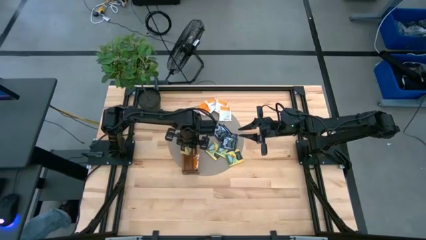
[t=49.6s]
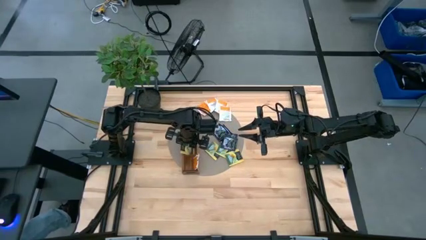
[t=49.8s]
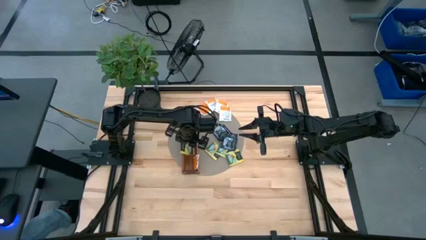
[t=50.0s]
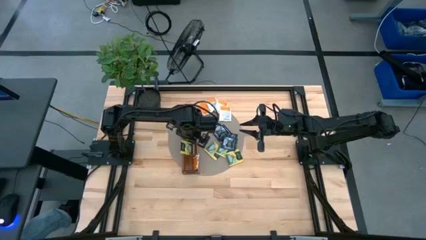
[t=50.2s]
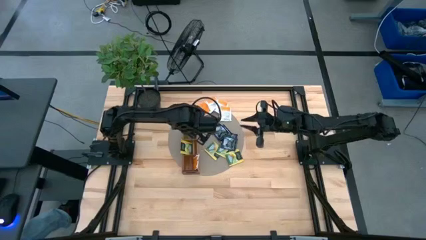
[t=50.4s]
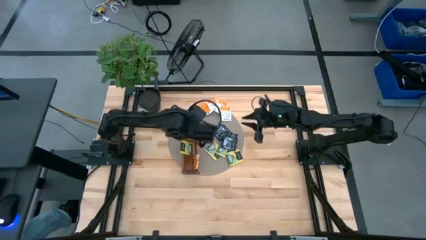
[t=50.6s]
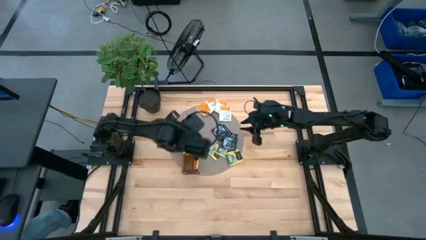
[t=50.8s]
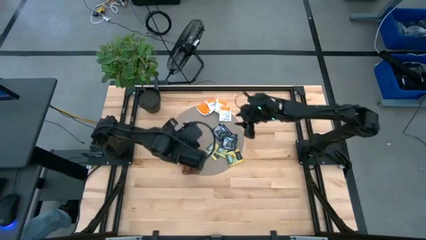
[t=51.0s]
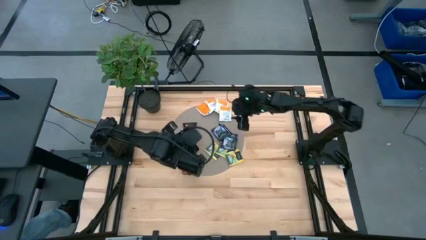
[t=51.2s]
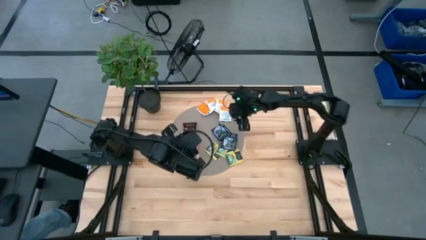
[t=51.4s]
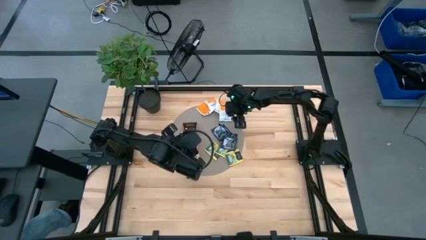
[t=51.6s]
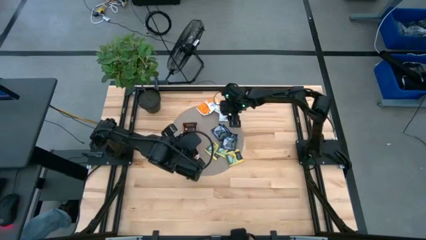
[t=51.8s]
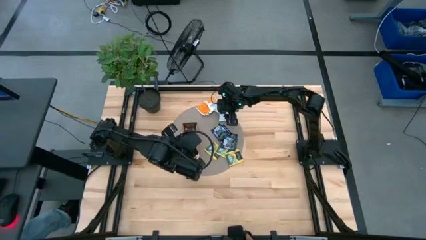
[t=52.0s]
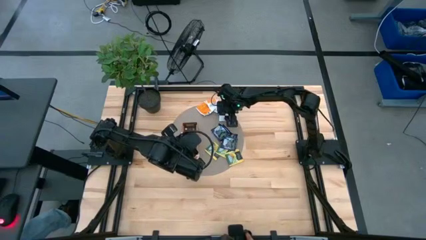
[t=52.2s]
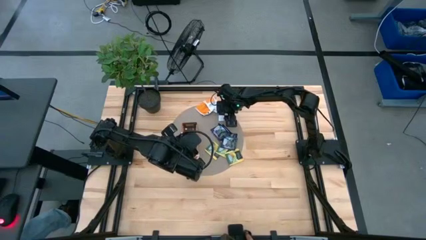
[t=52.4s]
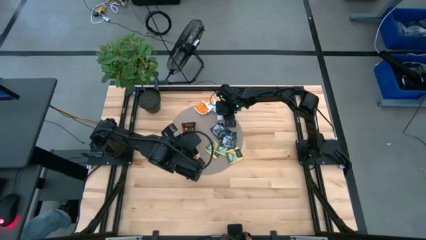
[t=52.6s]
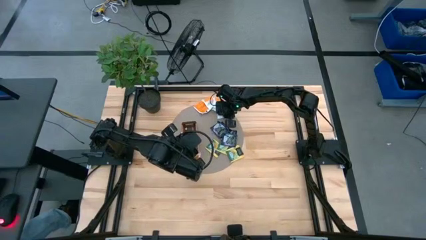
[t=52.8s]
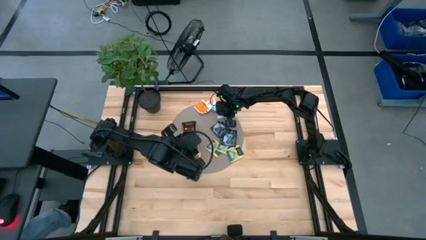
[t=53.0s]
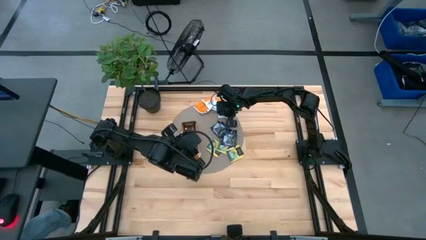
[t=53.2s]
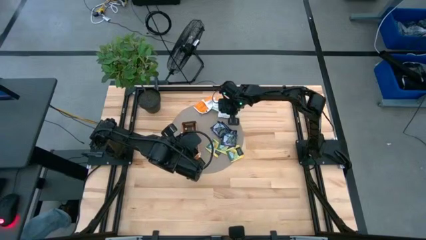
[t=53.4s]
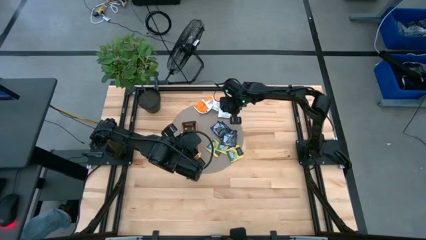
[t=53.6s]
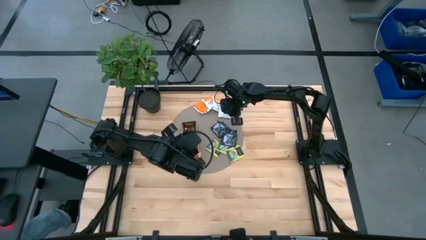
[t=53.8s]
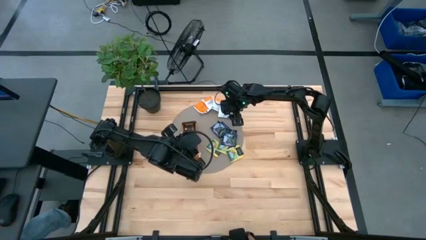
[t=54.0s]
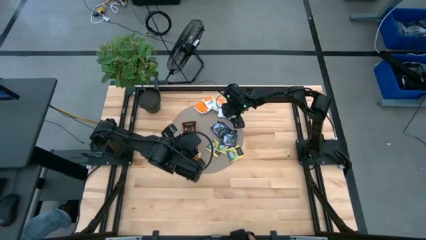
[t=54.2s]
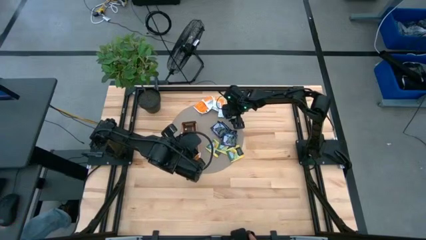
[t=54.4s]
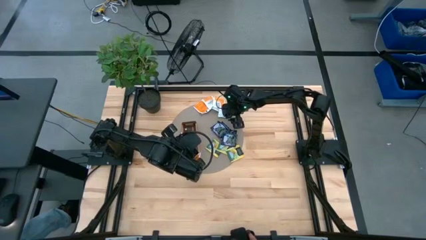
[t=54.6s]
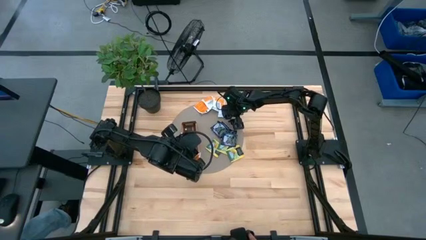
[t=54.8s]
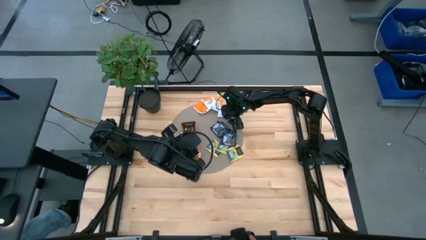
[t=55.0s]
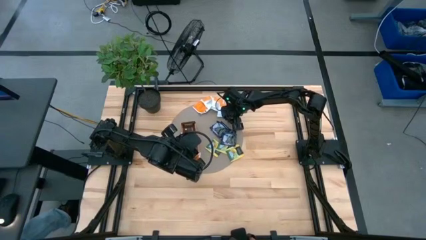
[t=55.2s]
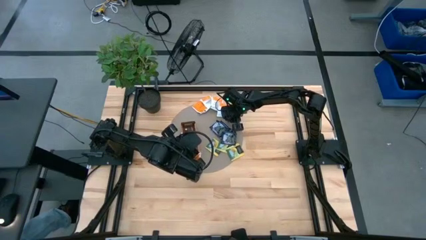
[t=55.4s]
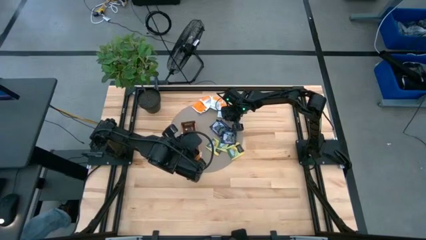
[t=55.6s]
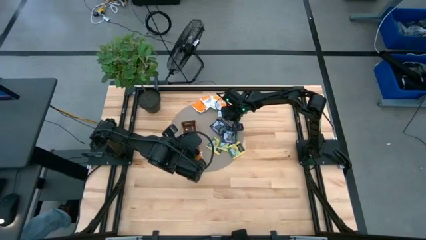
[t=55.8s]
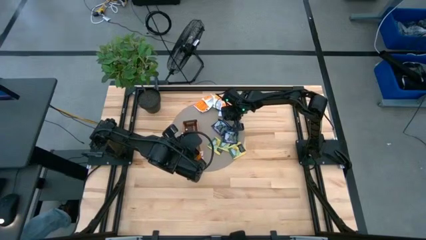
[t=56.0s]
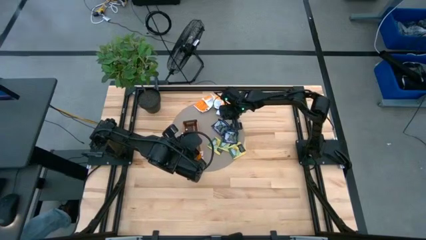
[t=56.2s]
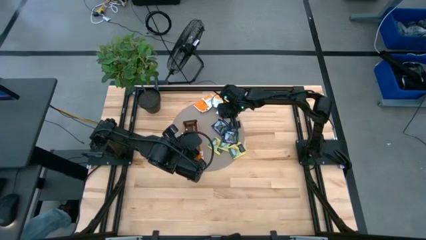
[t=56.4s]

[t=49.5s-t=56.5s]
Task: Pick & Place Tea
Put the white tea bag into the bottom section of the wooden organizer

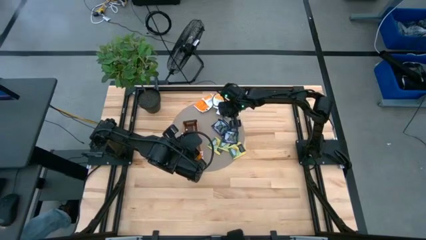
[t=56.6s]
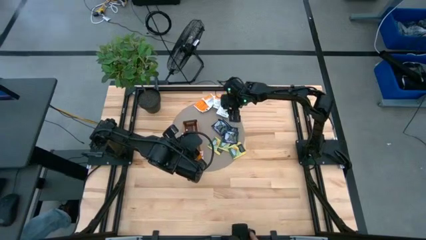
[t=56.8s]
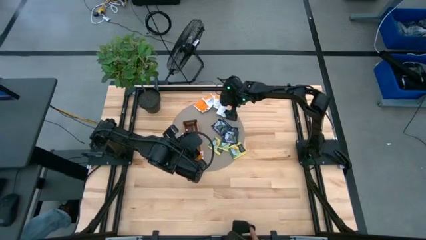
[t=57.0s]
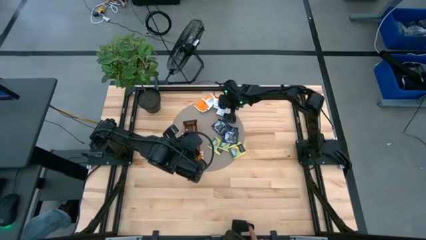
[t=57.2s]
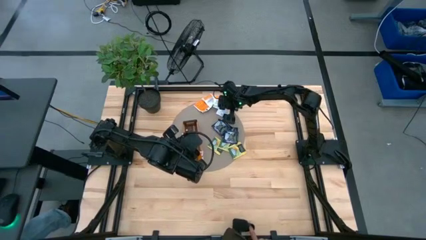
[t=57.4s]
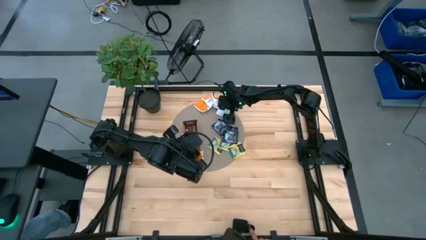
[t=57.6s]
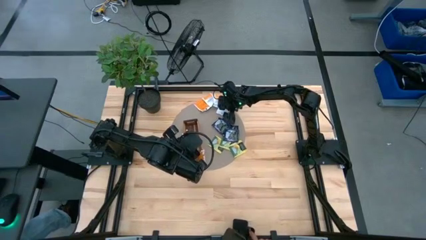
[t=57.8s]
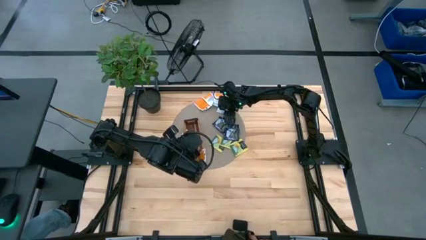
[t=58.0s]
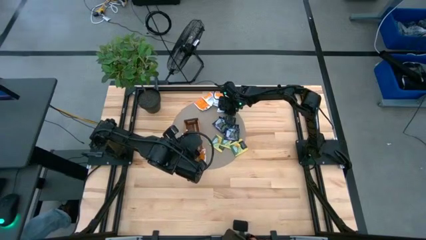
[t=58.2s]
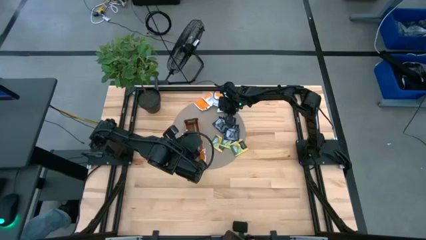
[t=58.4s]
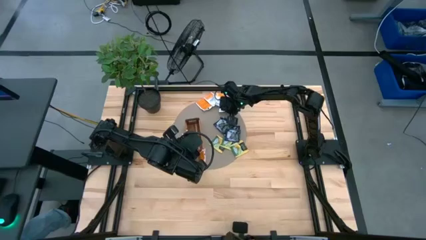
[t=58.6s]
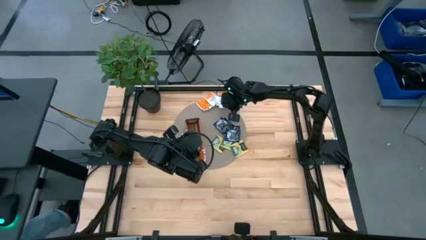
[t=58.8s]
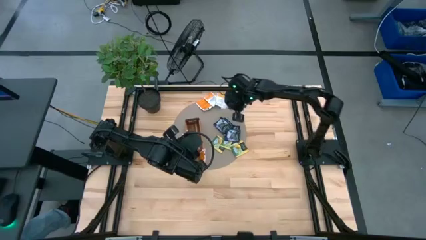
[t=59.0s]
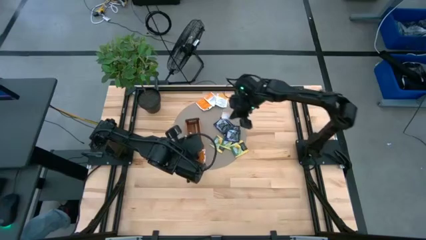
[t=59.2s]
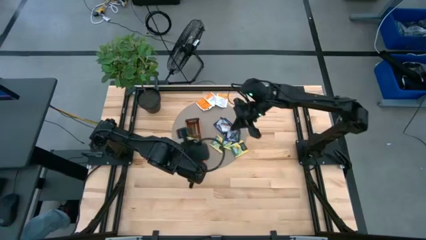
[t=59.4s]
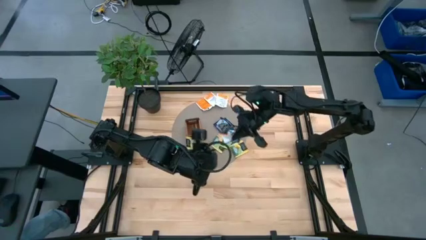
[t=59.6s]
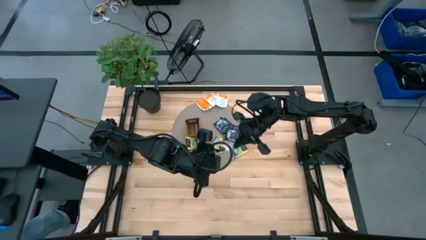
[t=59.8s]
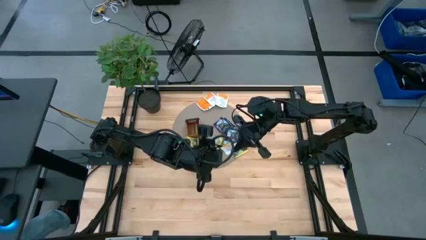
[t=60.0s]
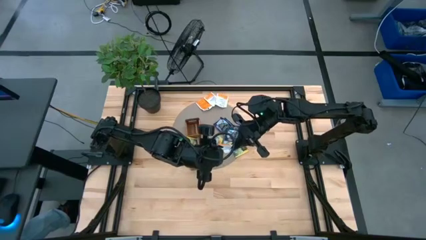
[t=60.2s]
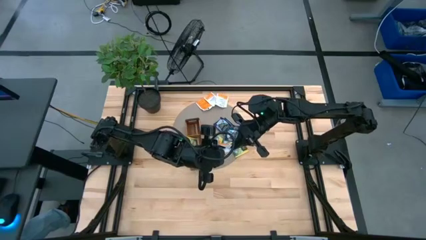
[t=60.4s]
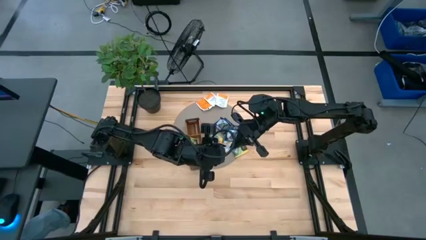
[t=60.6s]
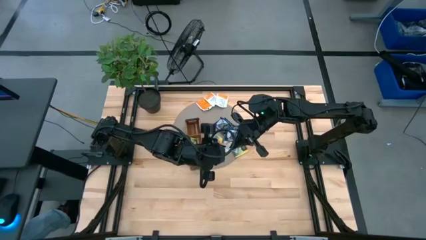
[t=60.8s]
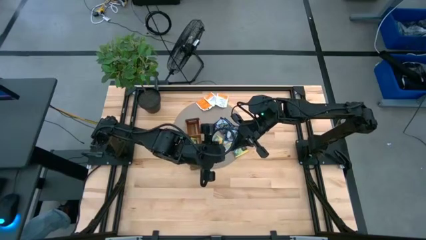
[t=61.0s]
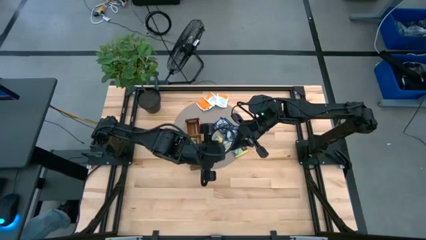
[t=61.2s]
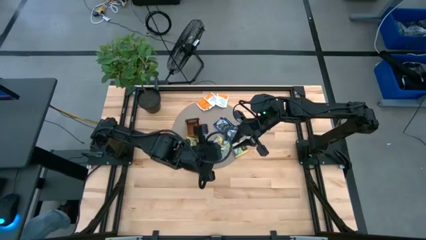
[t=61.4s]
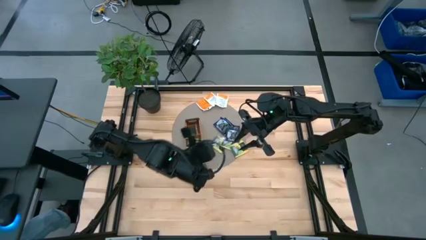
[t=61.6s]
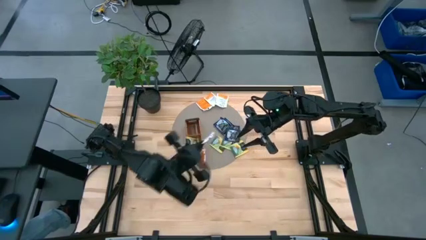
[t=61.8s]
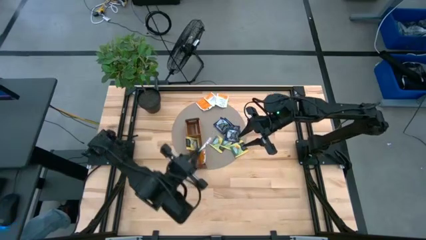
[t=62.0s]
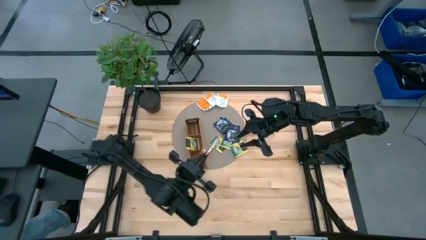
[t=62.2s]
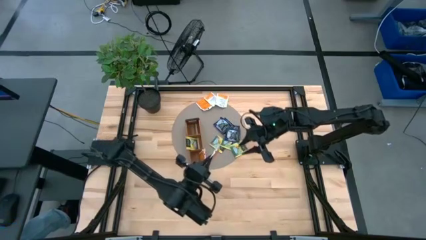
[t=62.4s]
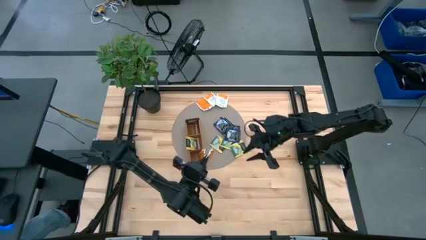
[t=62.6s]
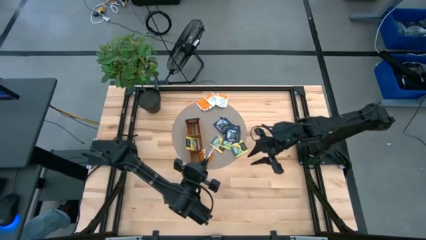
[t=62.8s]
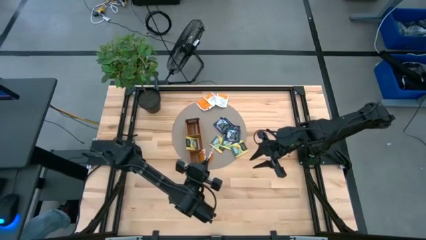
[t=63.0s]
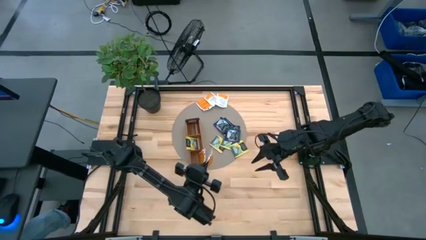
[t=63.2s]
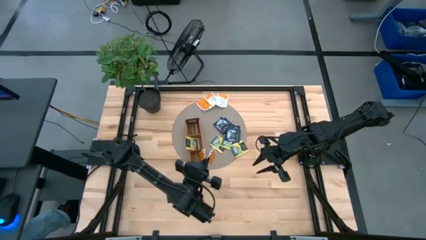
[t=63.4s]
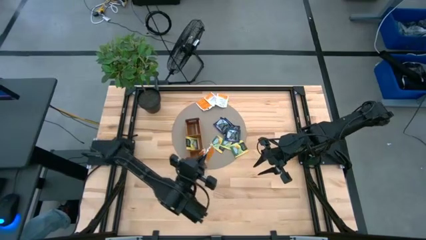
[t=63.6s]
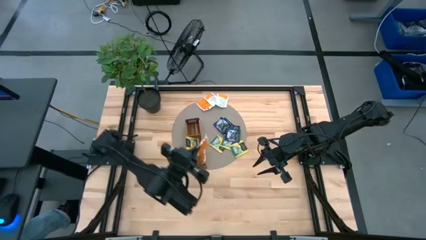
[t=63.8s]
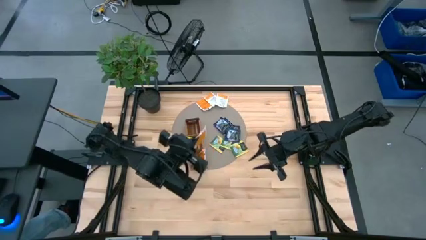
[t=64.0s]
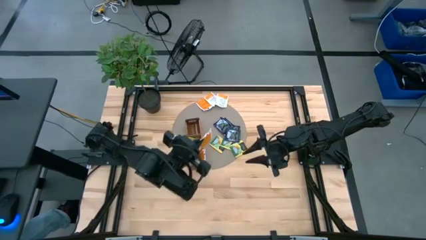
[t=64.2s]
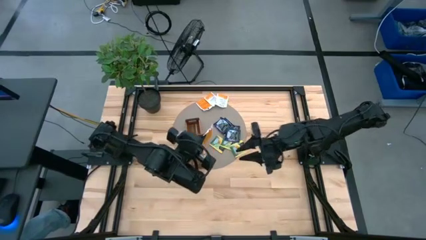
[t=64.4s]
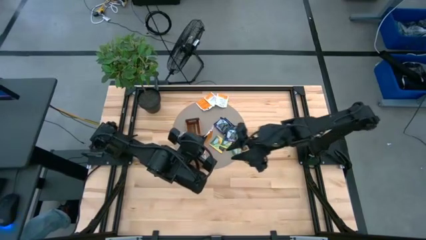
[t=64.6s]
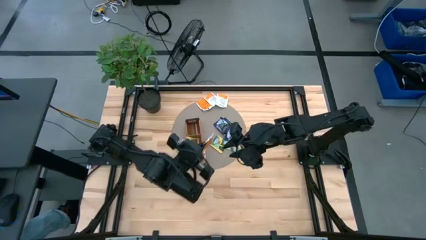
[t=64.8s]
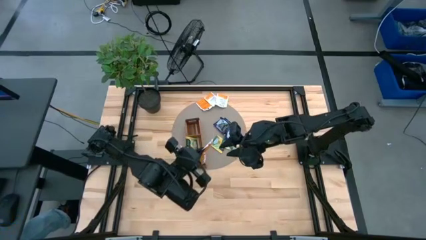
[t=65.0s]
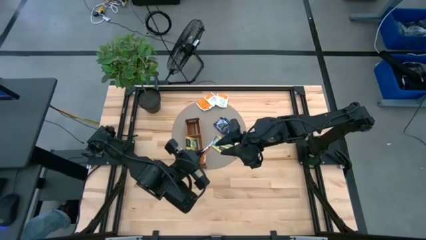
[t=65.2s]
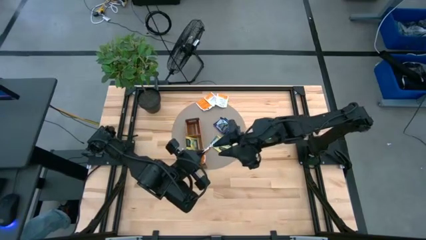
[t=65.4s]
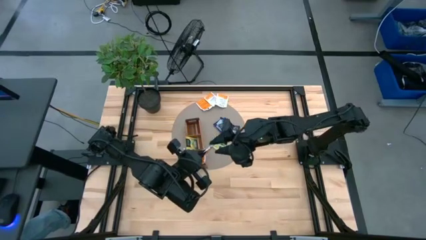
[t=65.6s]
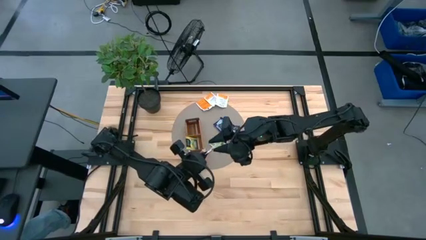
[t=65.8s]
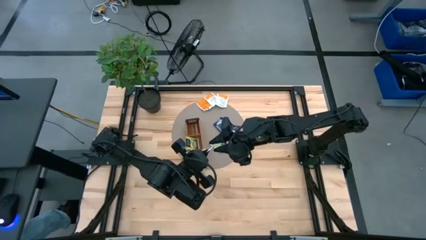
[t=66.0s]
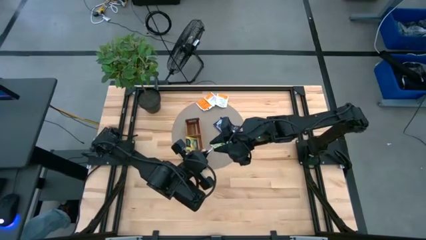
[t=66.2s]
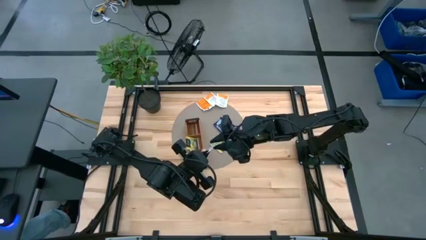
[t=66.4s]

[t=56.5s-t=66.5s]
Put the white tea bag into the bottom section of the wooden organizer
